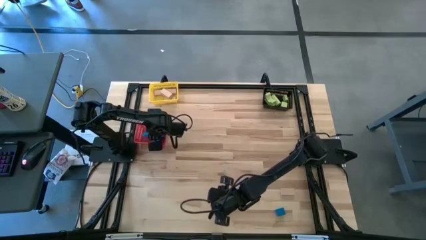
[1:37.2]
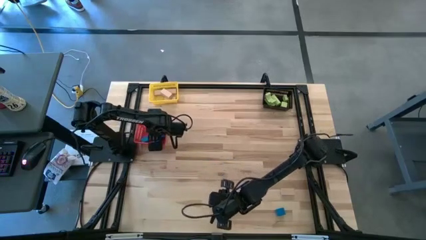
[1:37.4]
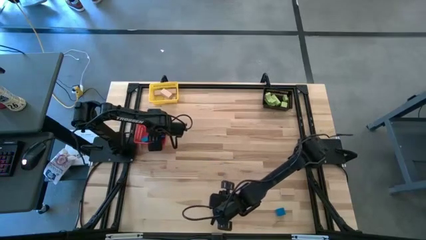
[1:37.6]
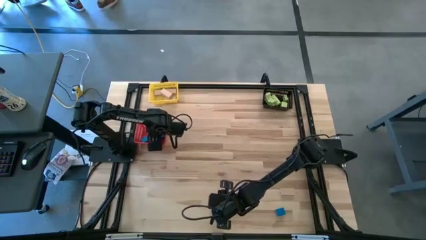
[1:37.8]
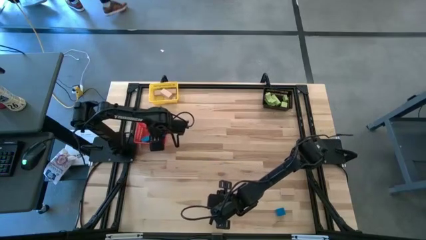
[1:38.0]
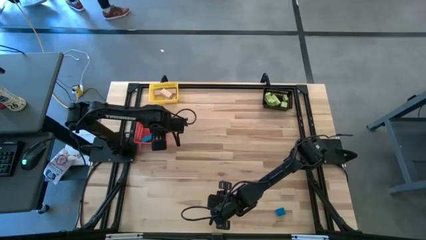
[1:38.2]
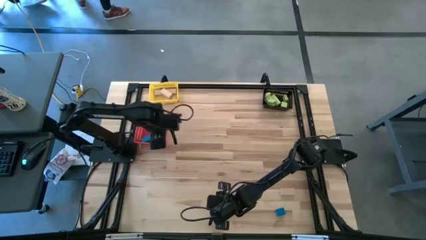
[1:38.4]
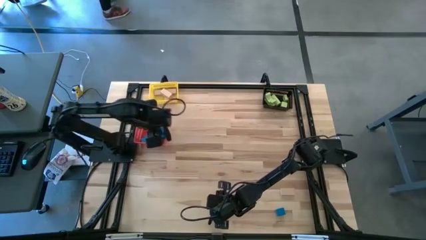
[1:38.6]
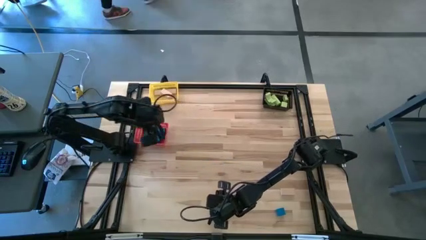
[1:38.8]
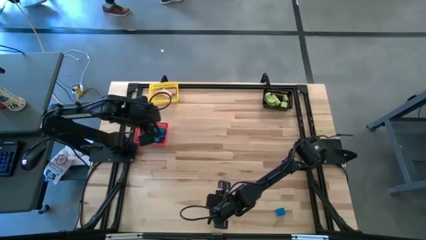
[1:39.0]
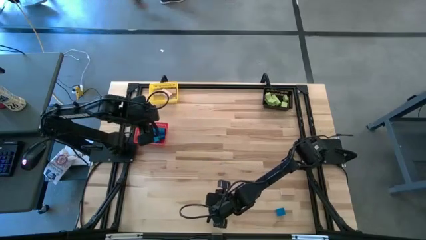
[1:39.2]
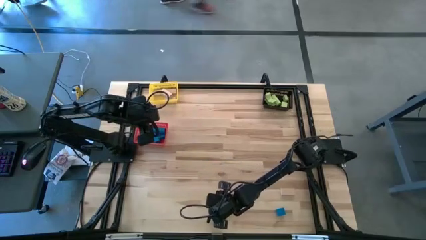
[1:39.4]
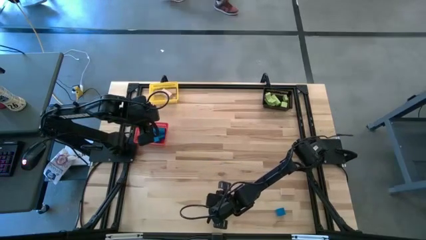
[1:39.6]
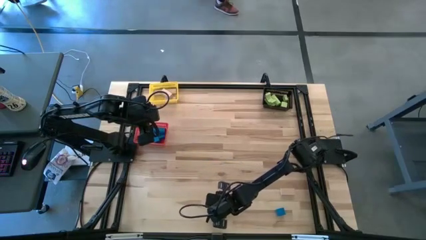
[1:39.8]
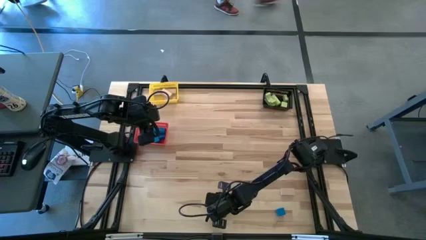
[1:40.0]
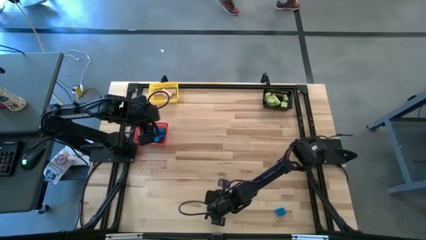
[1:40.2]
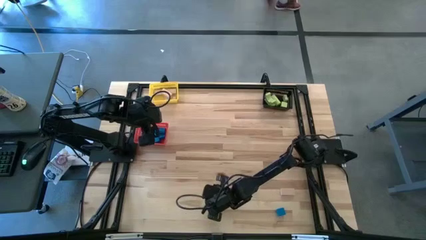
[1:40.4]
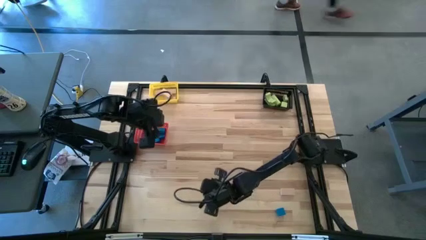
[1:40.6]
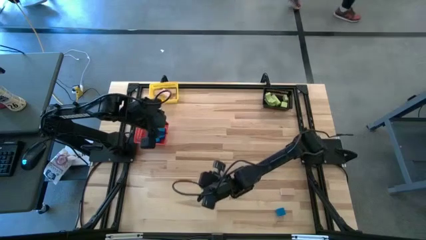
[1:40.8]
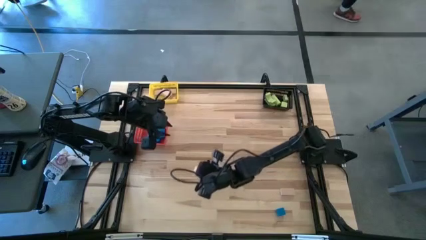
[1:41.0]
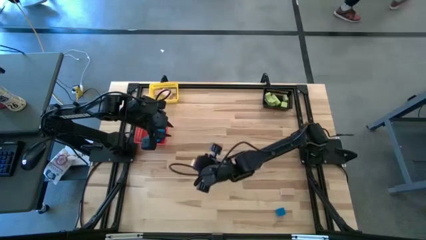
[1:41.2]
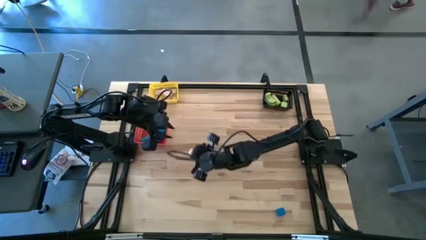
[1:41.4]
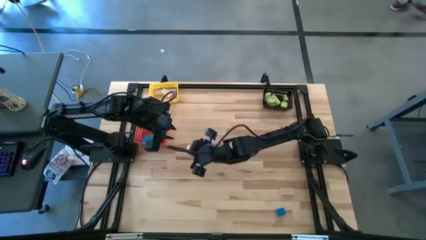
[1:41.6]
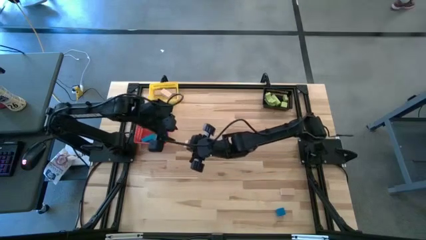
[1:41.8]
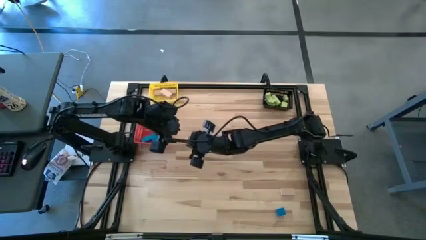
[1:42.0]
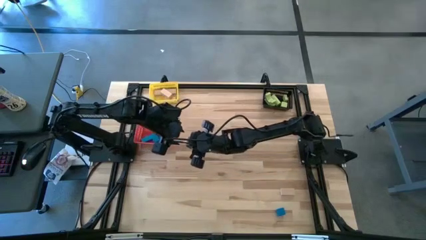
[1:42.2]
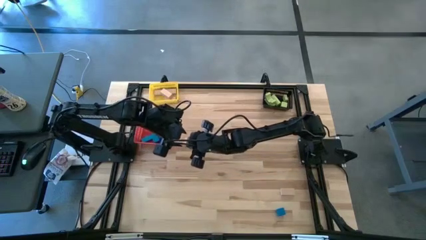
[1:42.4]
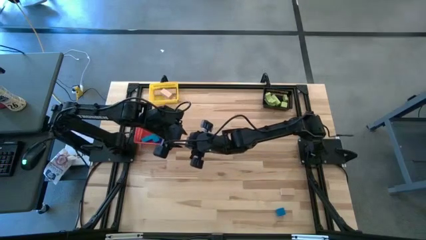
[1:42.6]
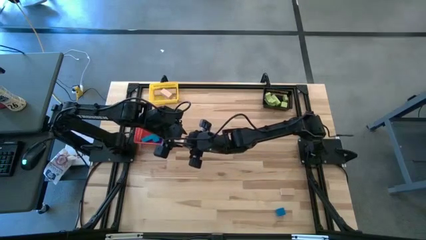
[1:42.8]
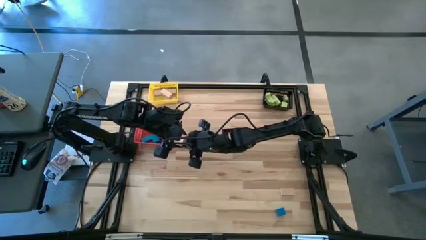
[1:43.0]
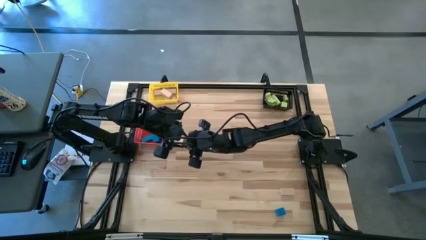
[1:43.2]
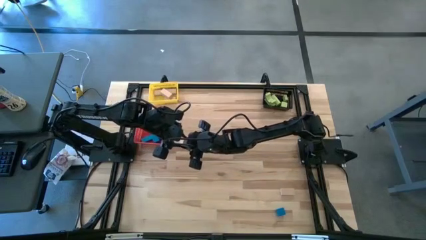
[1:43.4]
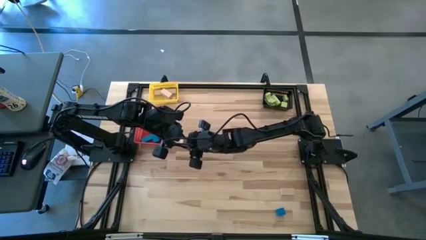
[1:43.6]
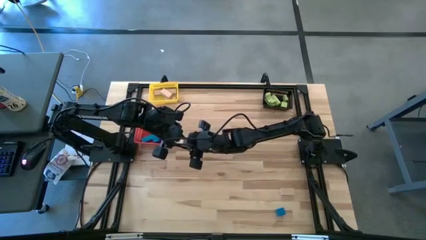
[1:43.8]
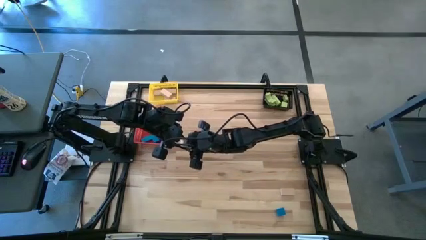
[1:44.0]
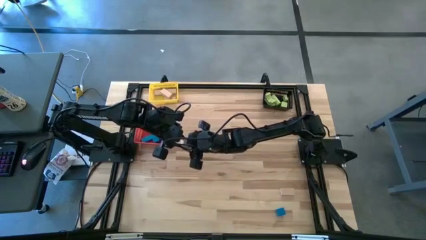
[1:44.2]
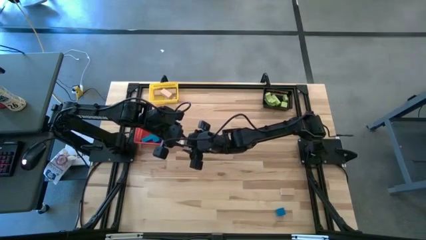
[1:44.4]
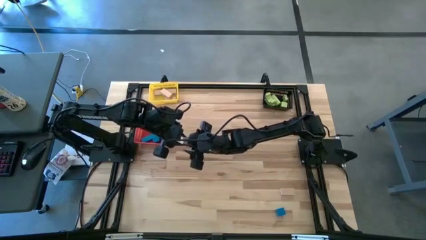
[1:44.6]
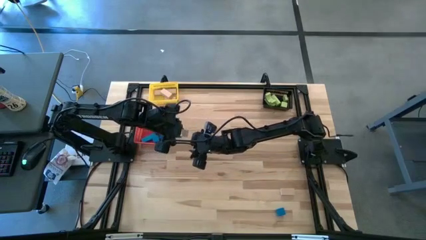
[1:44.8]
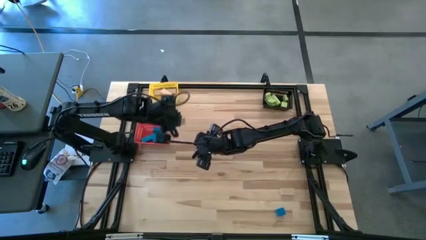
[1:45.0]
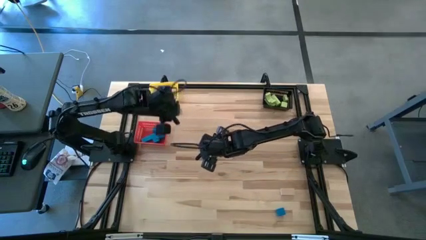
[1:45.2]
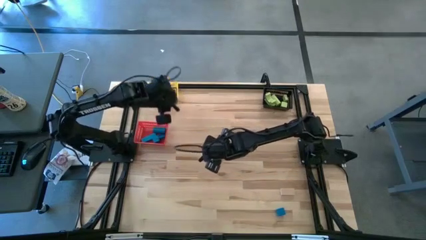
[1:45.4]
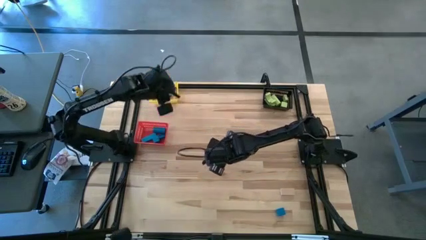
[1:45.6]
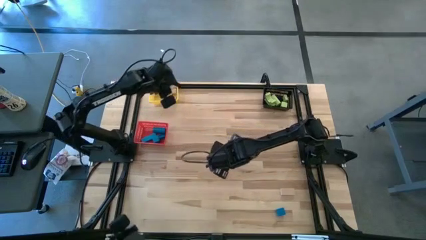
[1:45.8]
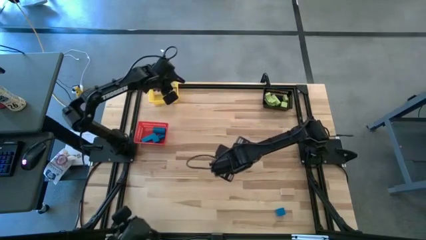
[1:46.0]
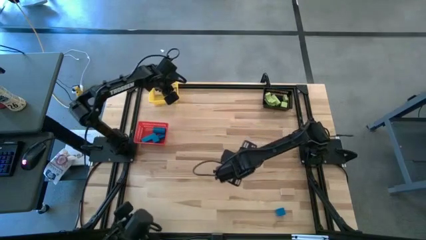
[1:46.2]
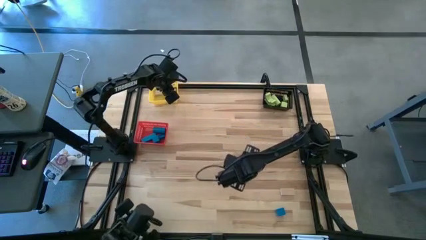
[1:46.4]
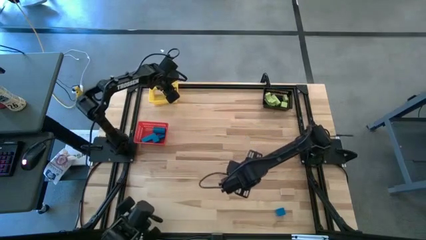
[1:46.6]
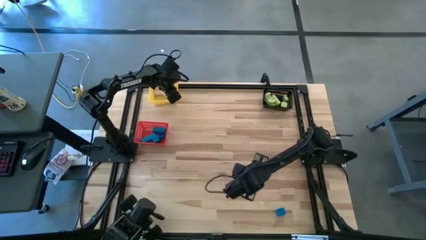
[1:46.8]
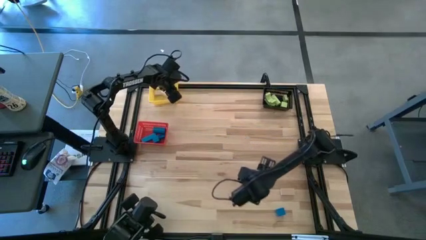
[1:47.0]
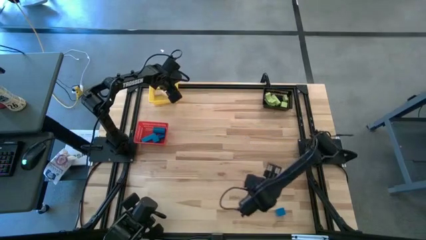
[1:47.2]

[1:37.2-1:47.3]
Task: Sort & place blocks by color
Put the brown block into the yellow bin

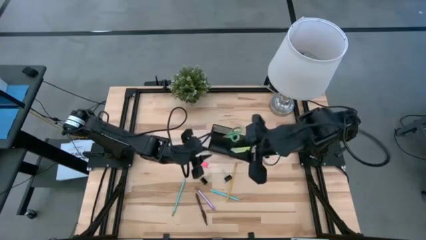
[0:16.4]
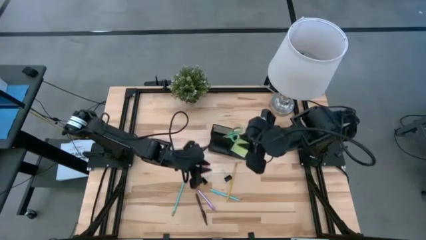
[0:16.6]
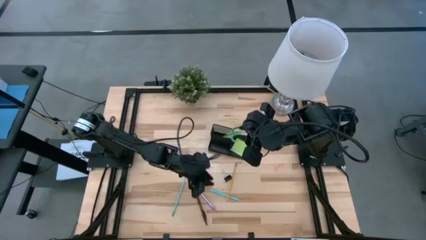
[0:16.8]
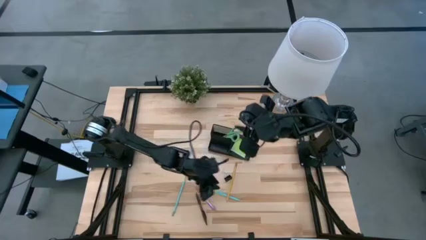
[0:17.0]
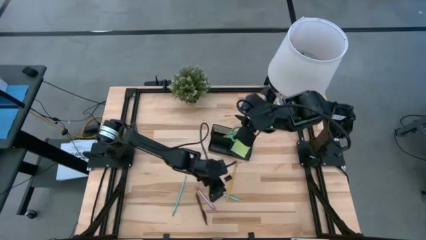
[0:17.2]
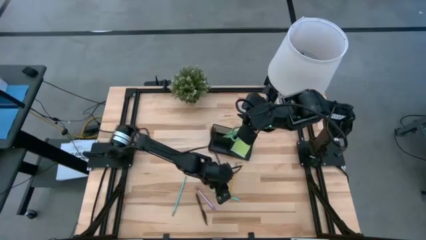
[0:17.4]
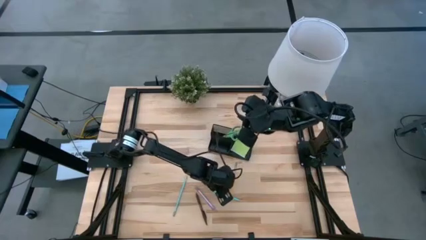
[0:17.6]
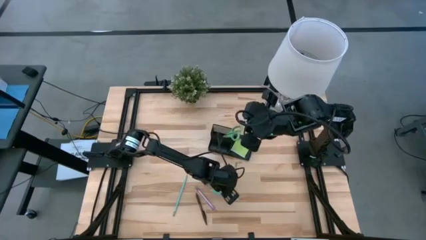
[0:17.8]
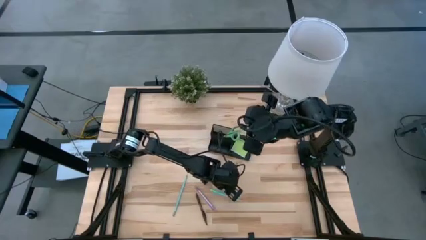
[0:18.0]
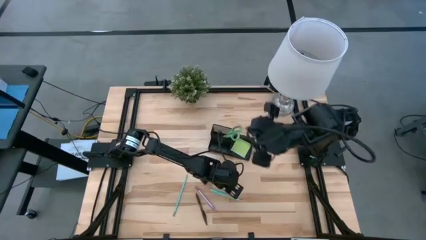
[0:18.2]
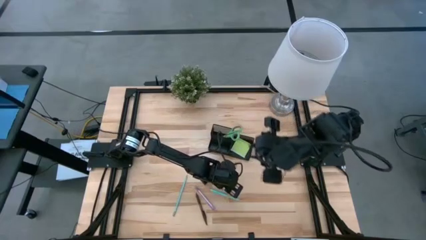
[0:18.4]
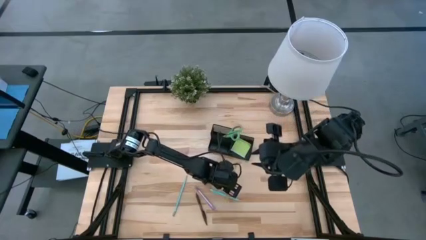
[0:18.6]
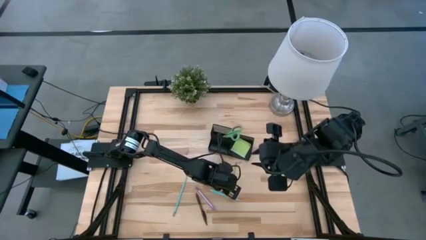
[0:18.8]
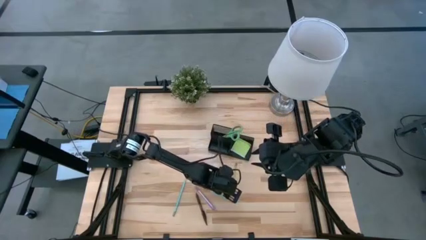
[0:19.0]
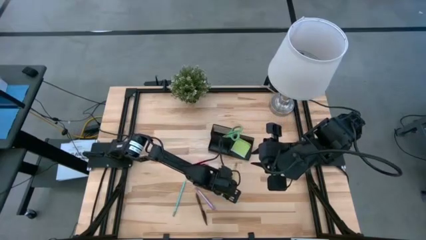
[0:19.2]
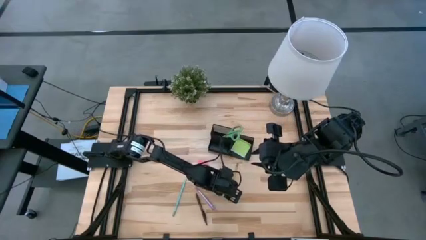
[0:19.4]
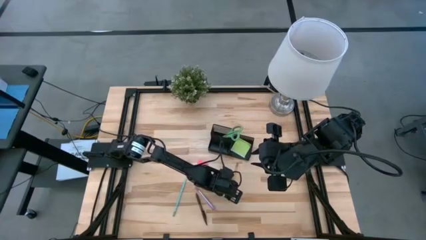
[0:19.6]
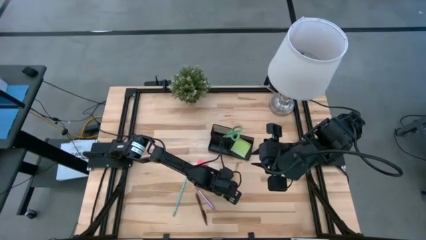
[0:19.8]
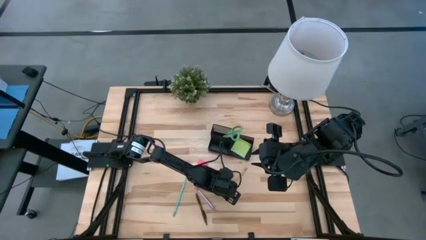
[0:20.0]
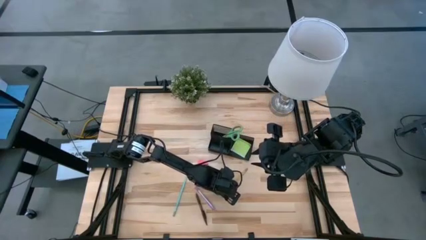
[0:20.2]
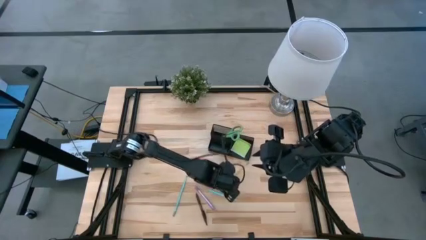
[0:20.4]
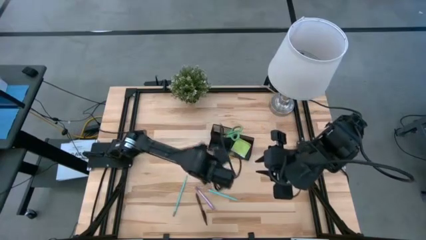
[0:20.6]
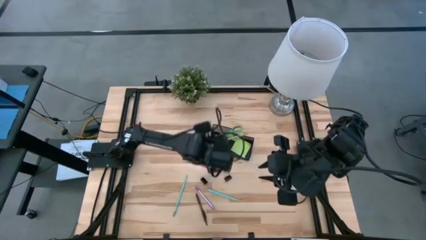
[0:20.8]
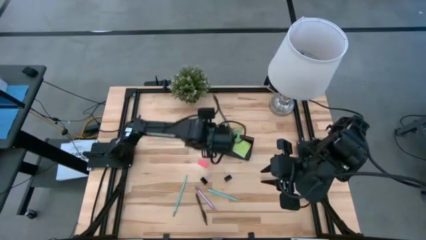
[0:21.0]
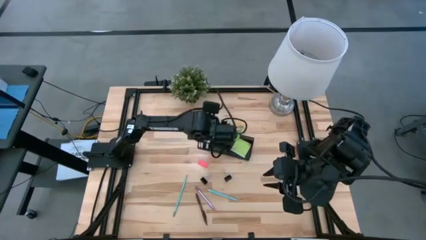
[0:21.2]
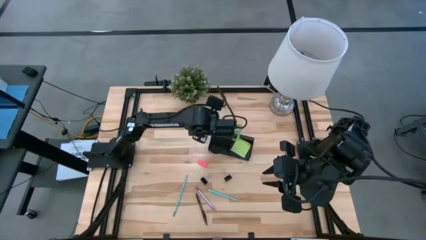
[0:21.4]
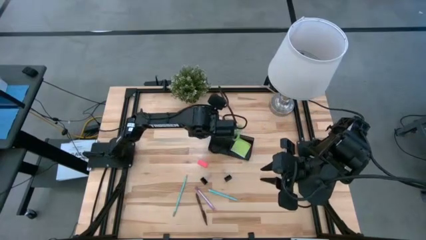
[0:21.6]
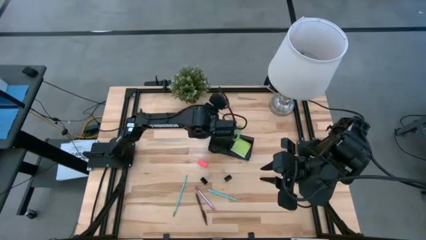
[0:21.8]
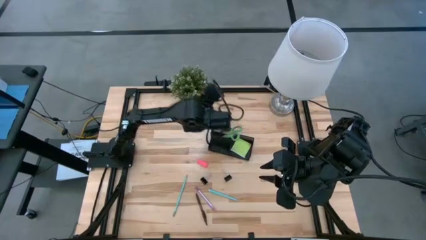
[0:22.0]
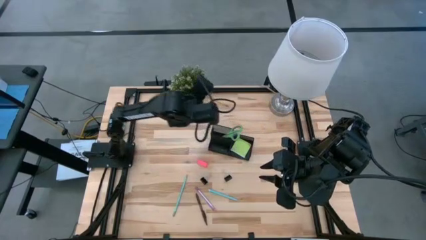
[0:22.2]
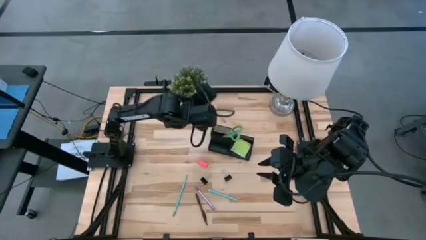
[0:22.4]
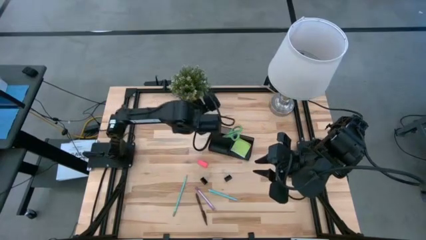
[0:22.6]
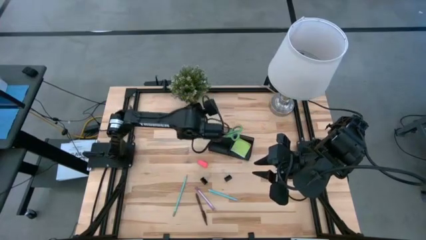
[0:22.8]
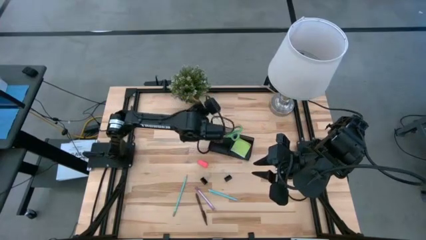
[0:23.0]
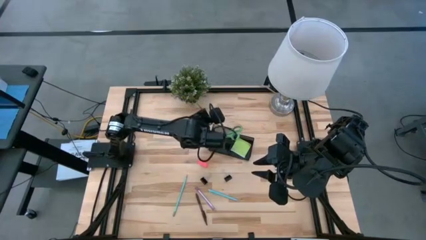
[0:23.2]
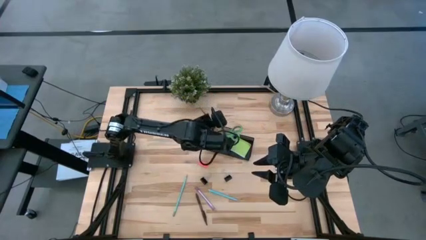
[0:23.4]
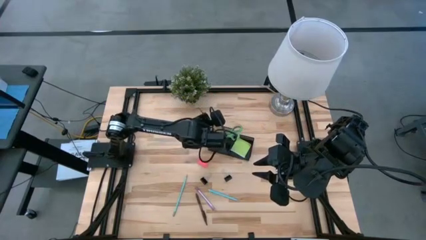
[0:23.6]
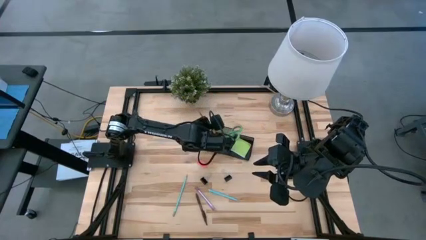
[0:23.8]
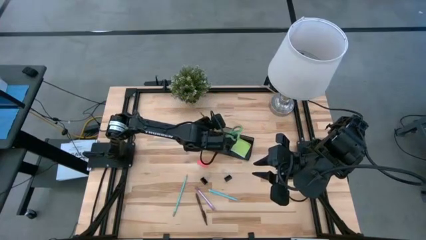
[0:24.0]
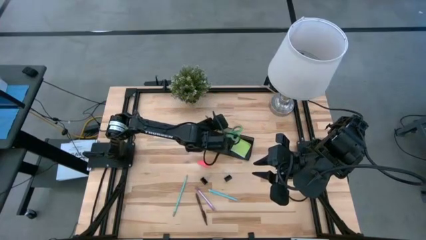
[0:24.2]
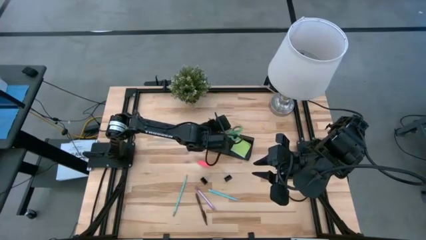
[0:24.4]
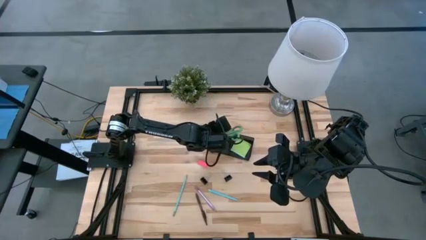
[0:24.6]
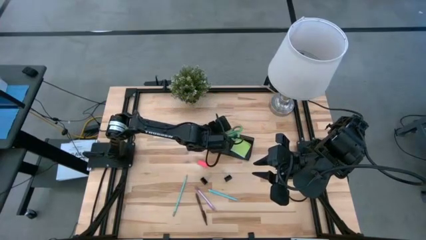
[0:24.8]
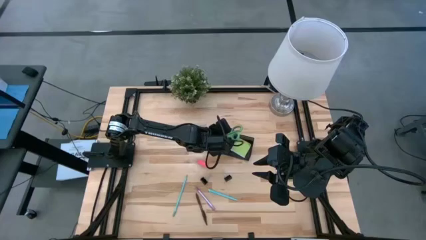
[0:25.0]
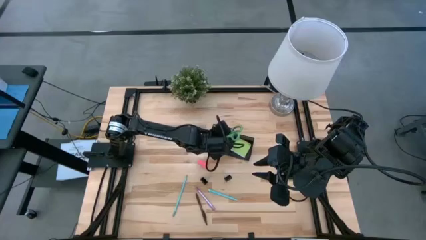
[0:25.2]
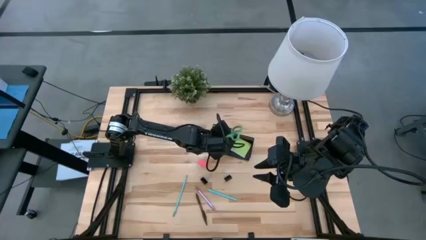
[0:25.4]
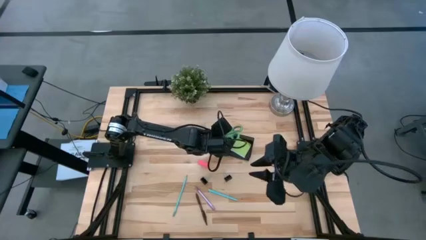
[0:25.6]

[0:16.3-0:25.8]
Task: Pick and place office supplies into organizer
Put the yellow pencil on the black desk organizer
